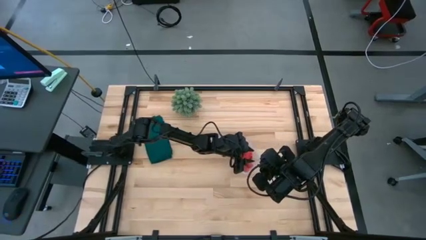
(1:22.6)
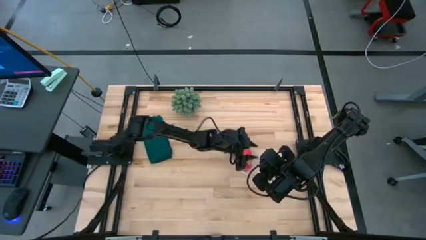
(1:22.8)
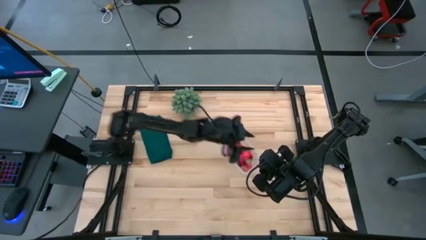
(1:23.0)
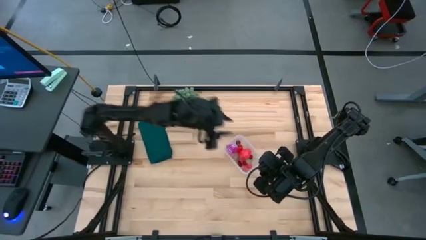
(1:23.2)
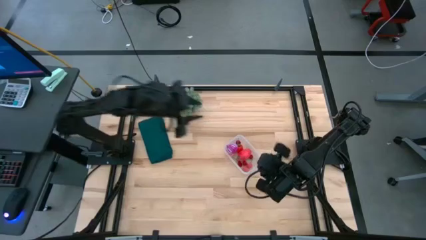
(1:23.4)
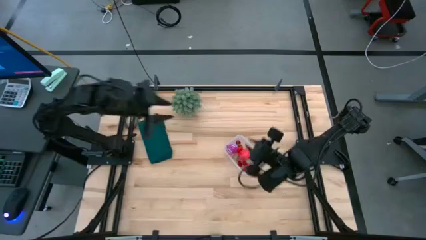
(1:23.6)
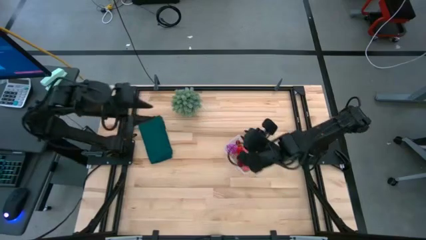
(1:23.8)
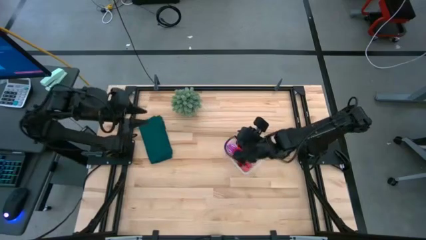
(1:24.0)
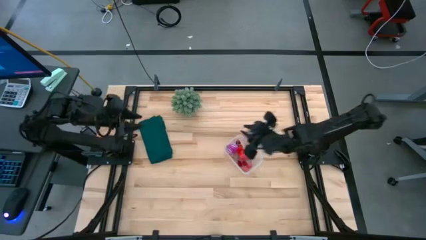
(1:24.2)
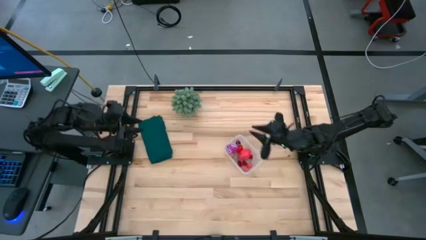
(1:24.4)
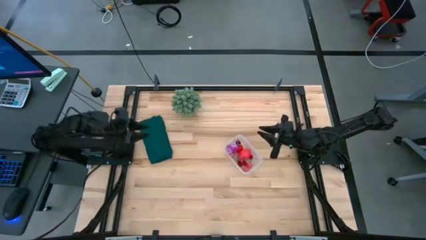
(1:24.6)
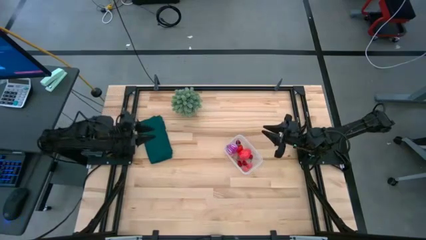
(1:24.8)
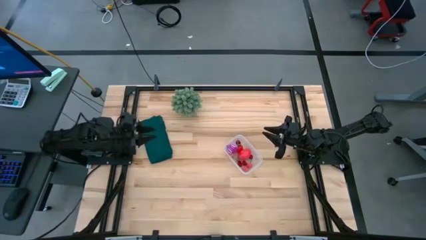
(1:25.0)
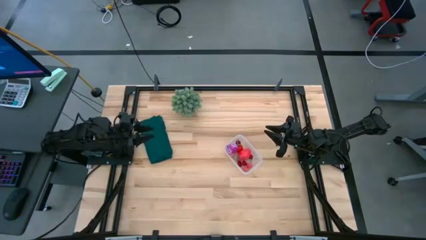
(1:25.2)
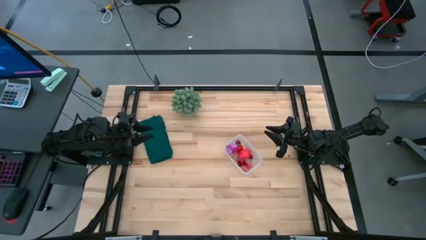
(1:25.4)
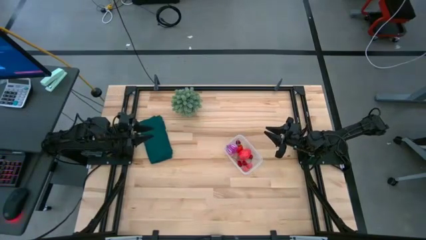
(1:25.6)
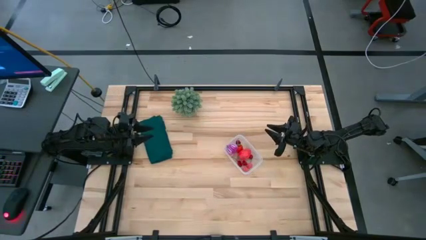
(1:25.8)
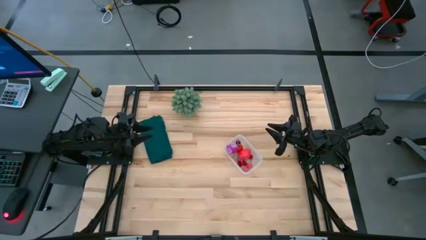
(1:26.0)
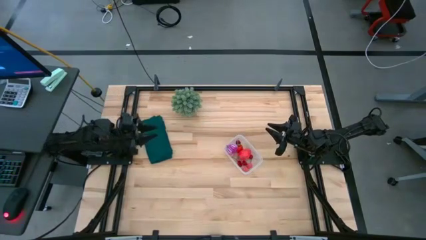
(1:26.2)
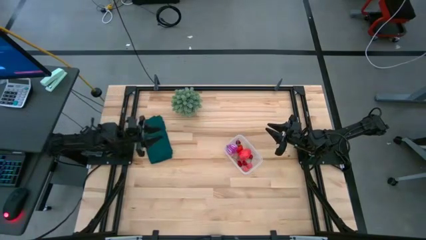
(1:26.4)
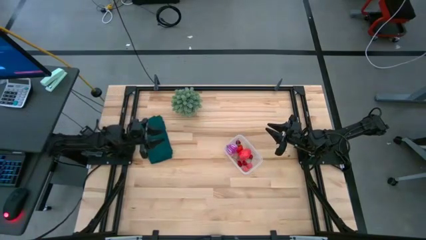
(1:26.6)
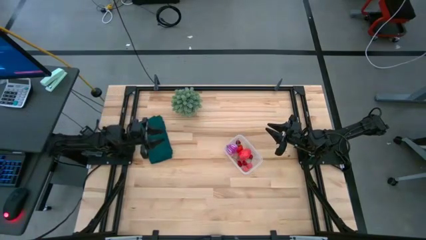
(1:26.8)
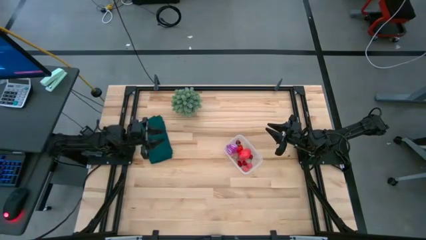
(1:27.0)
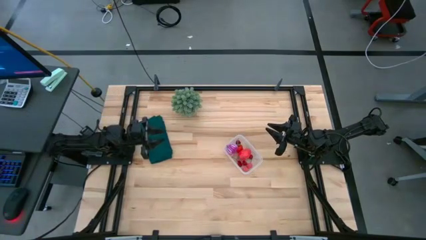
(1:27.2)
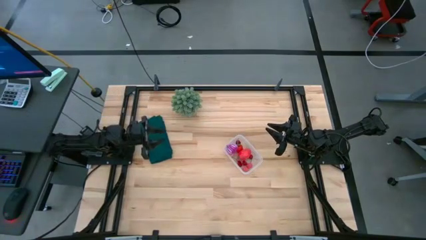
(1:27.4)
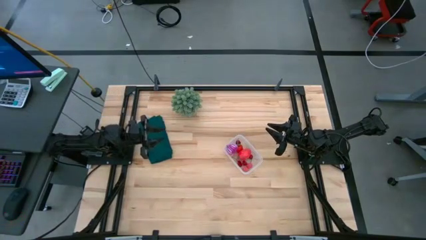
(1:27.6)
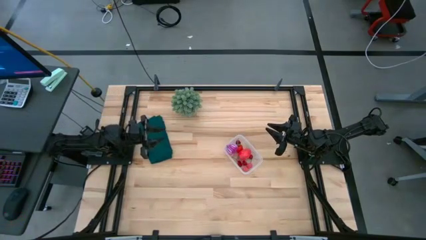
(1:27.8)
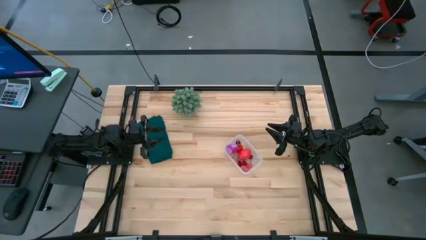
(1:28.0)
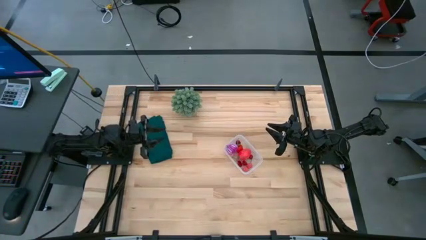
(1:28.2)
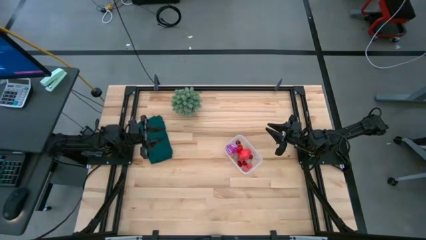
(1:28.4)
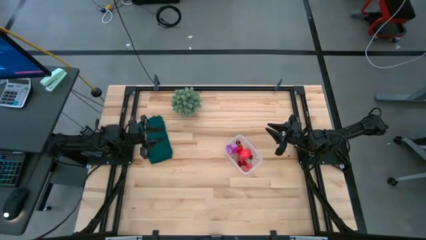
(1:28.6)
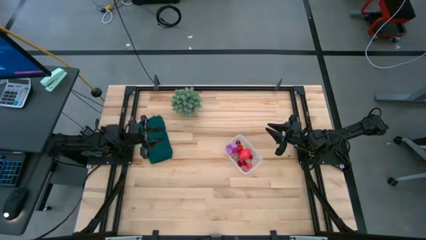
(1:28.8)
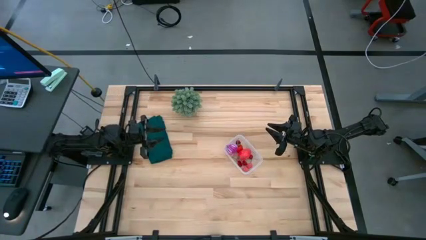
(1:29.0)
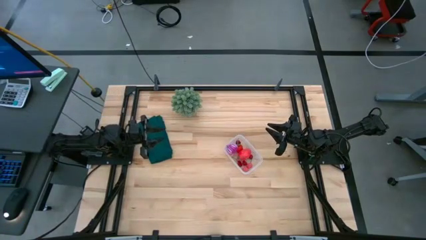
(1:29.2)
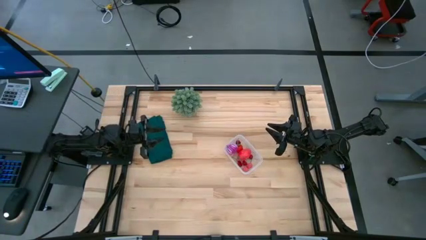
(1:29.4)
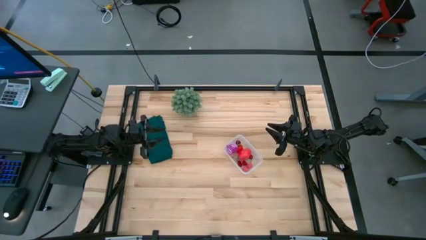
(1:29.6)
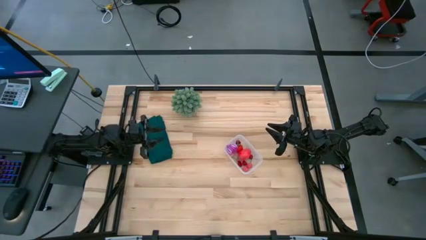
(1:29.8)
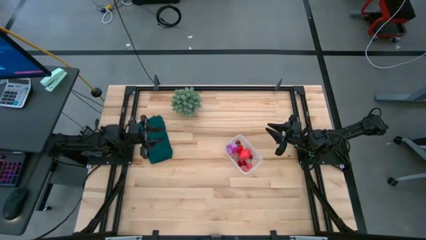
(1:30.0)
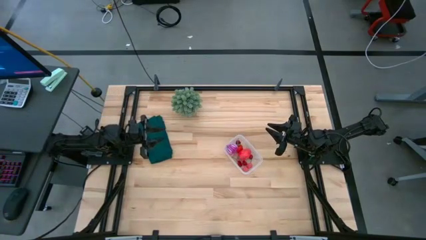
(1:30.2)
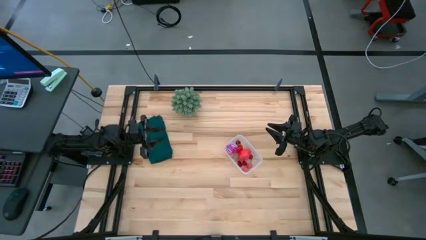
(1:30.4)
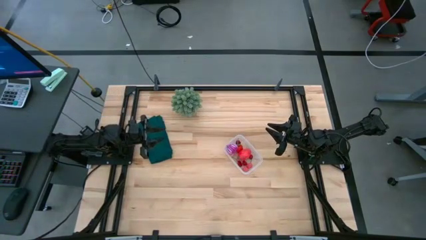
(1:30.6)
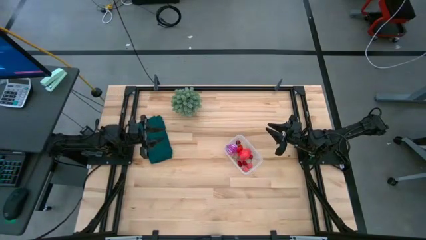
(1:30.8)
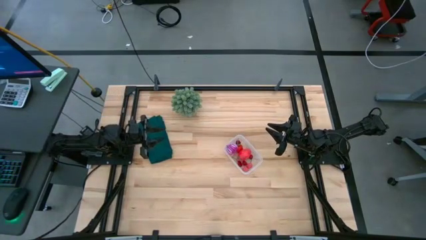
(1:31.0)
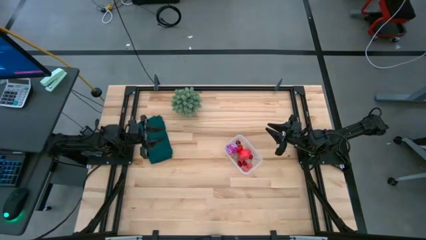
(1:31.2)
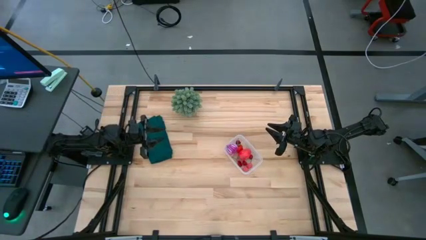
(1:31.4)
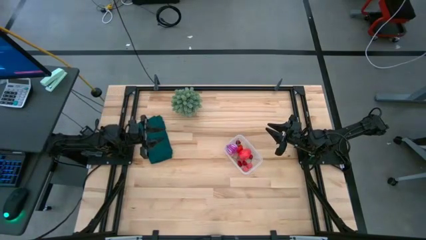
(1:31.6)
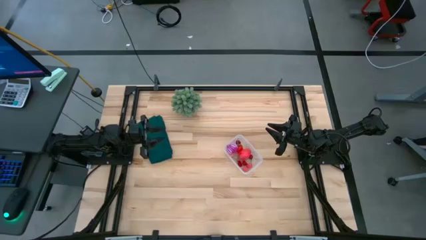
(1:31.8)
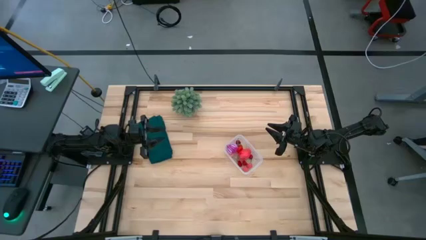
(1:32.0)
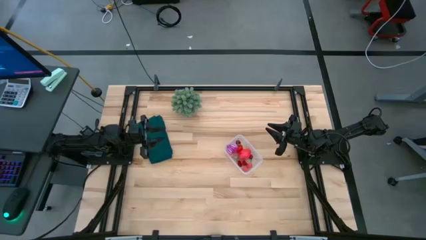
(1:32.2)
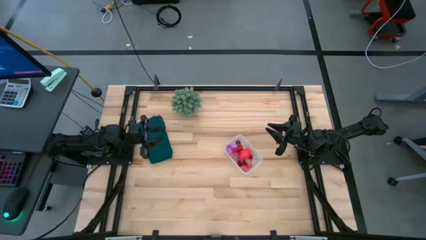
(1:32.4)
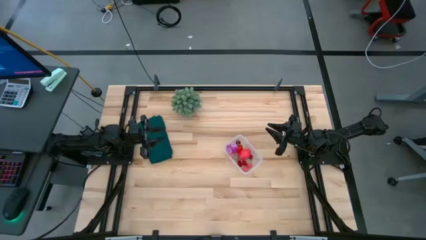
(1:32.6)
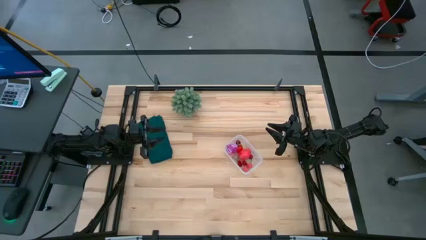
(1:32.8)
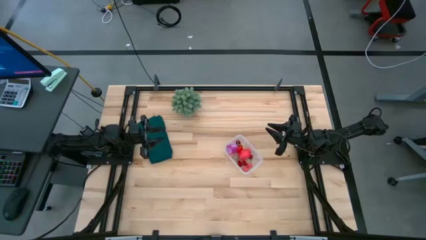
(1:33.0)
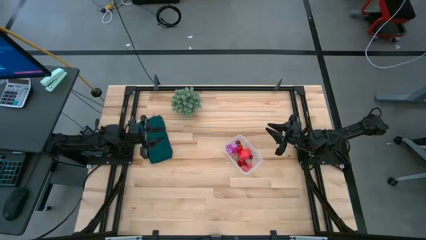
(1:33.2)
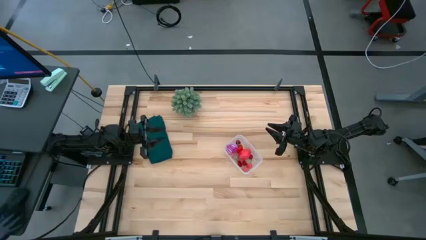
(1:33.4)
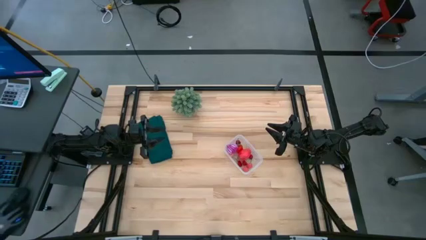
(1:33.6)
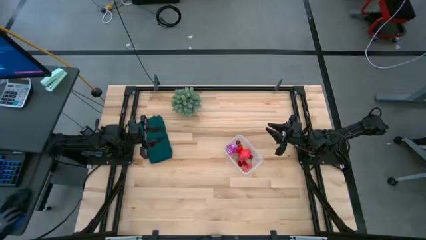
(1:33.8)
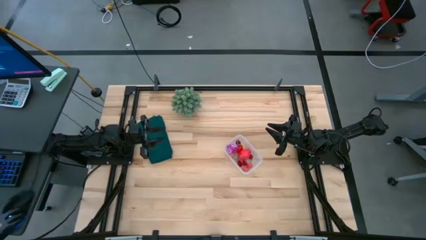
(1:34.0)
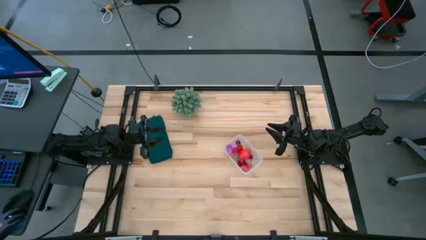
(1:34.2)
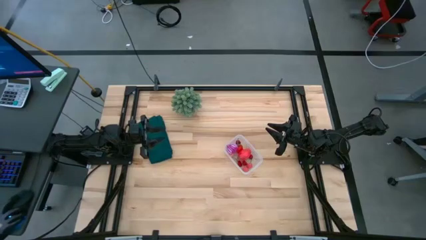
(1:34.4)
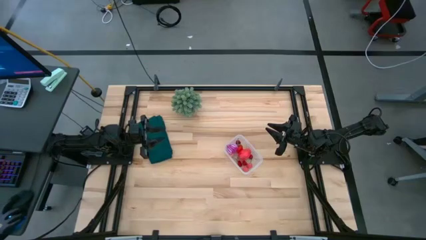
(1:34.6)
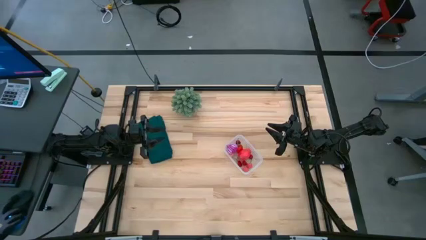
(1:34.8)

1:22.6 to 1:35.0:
Task: Pick and placing Produce into tupperware
Return to Home Position

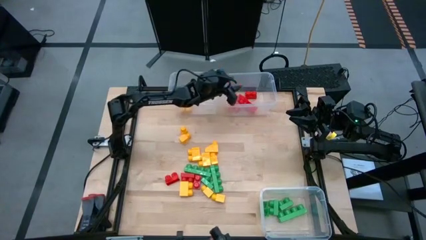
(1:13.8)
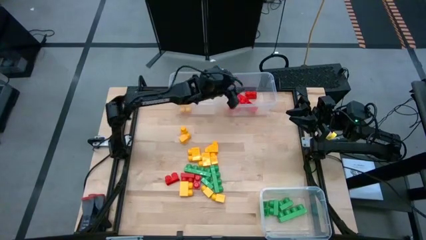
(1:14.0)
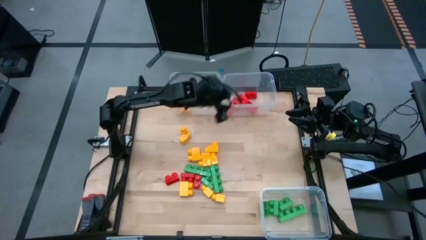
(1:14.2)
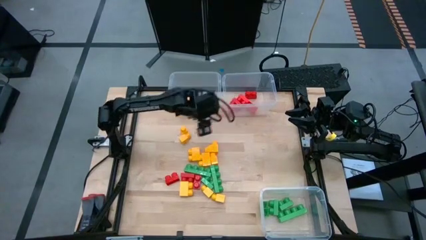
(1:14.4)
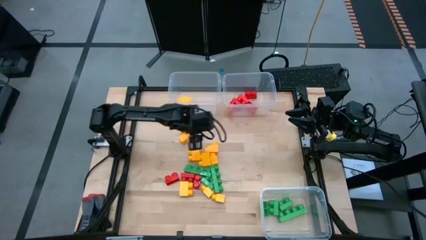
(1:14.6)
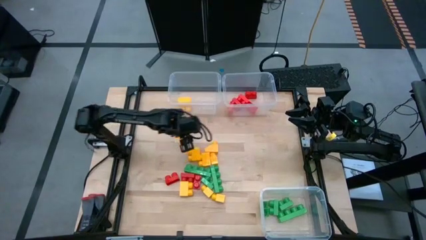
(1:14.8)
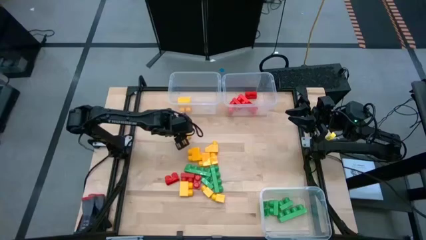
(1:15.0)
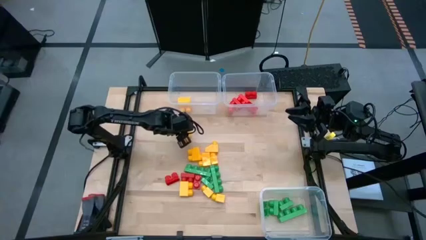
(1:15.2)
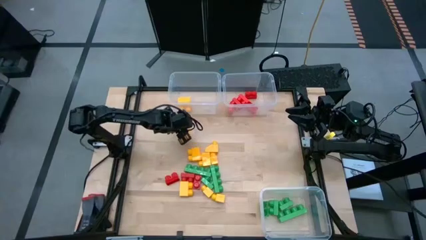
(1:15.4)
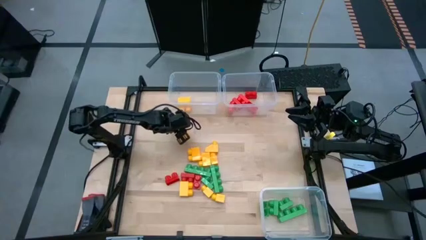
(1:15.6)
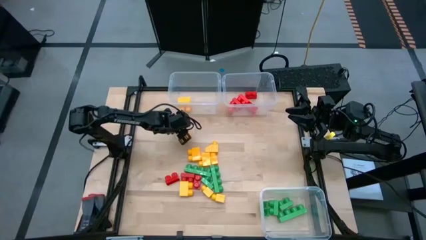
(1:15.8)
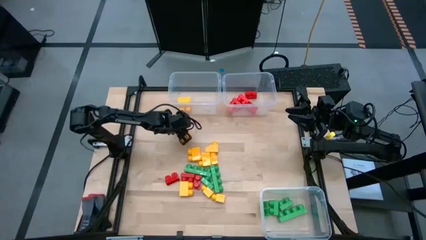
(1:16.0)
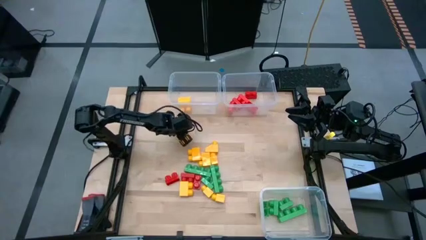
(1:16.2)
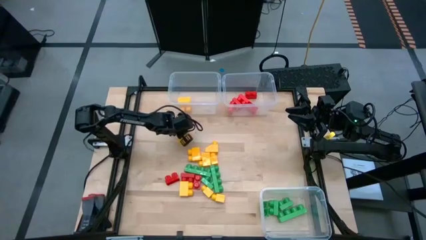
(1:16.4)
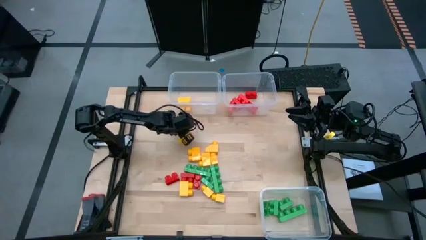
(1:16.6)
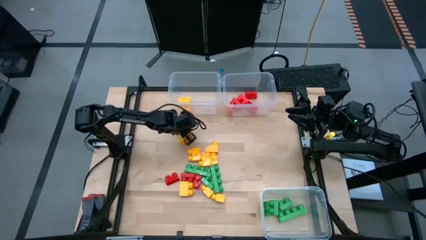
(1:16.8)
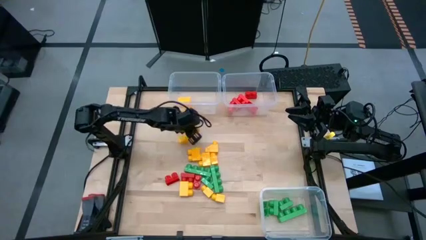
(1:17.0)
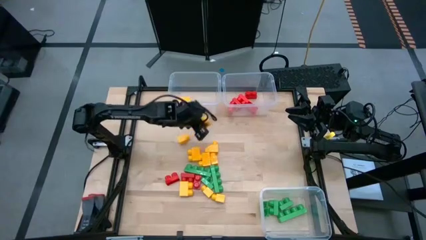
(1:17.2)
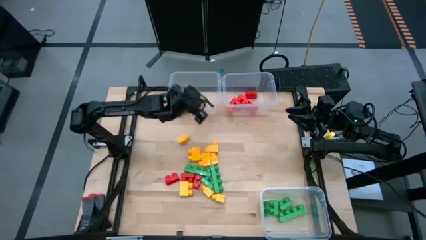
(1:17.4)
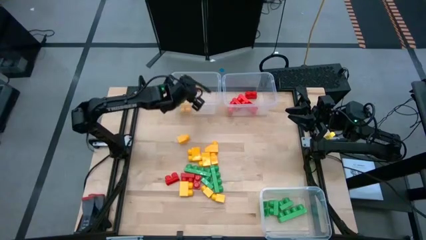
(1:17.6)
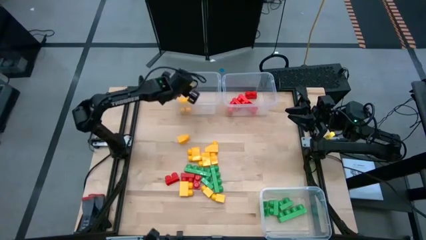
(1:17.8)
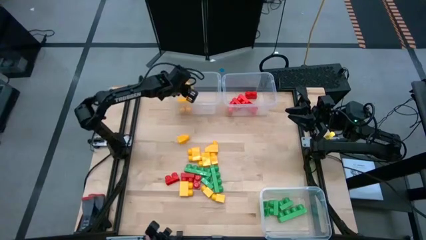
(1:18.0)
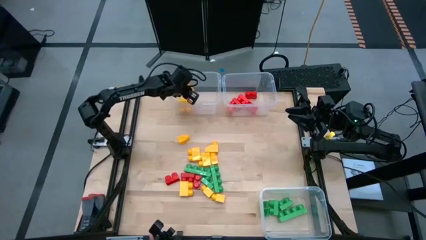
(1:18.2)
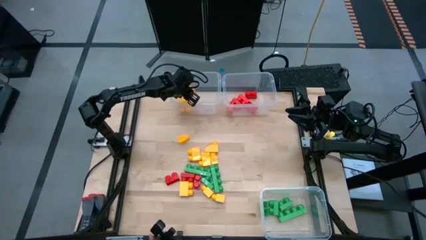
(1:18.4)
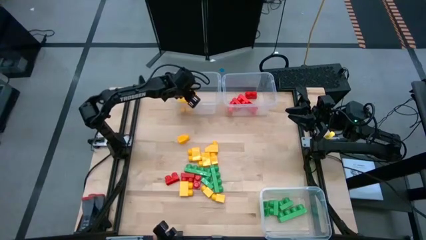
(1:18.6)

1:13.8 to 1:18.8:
Task: Sort blocks
Put the yellow game piece into the top left transparent bin
